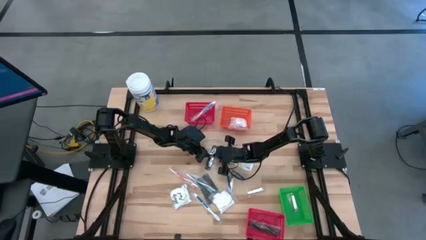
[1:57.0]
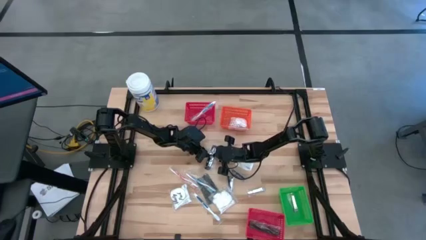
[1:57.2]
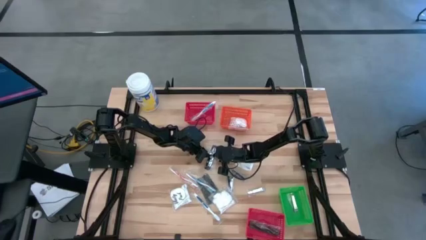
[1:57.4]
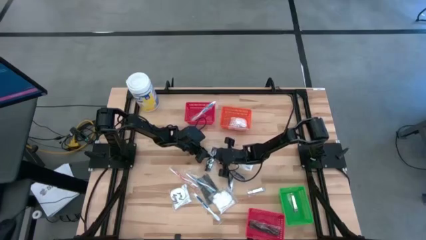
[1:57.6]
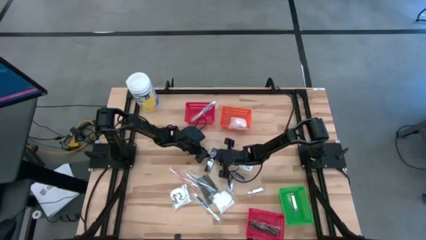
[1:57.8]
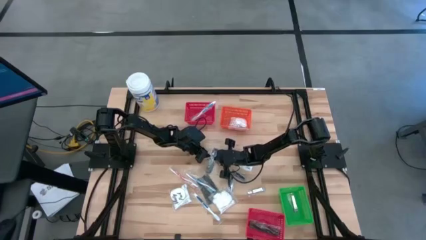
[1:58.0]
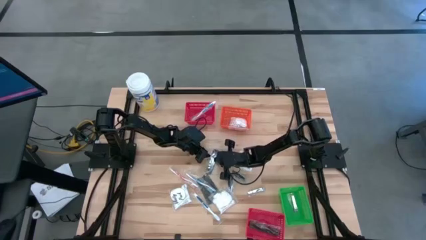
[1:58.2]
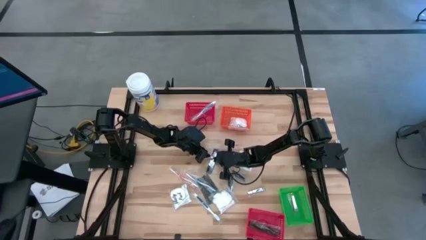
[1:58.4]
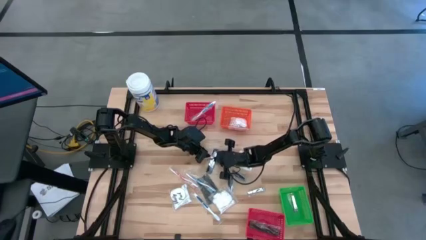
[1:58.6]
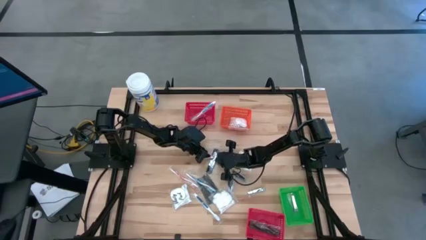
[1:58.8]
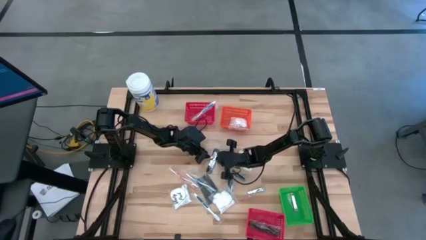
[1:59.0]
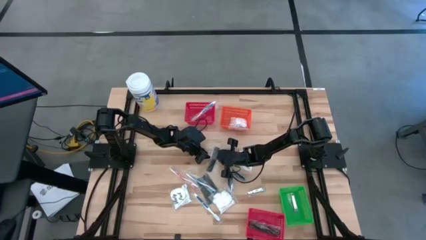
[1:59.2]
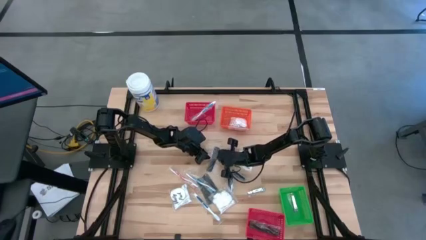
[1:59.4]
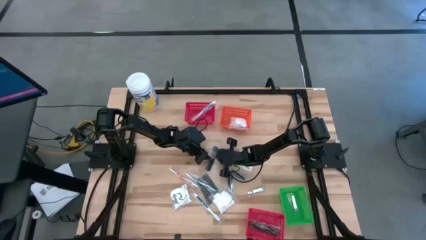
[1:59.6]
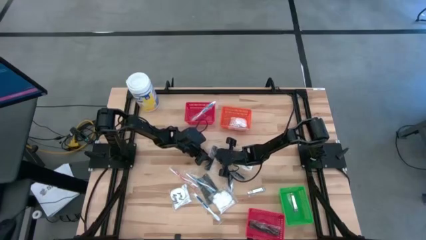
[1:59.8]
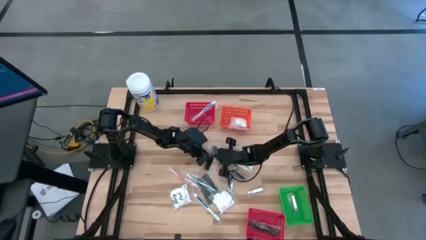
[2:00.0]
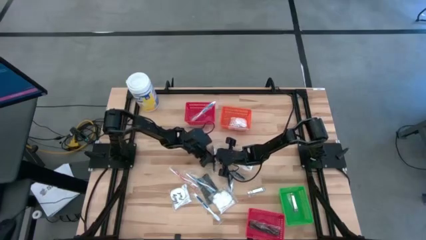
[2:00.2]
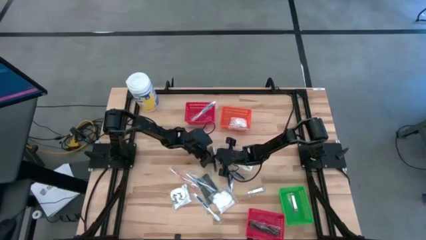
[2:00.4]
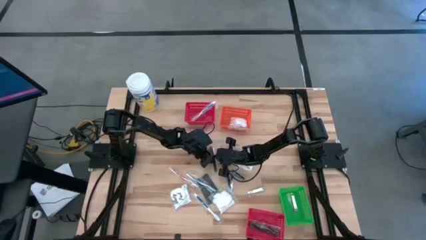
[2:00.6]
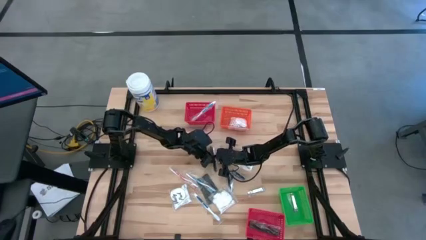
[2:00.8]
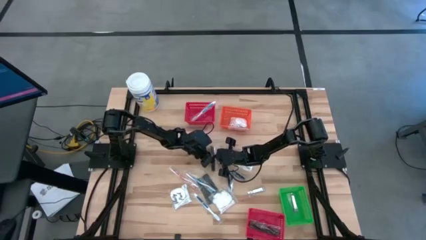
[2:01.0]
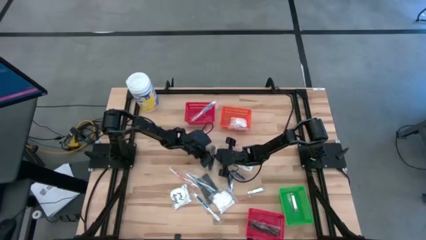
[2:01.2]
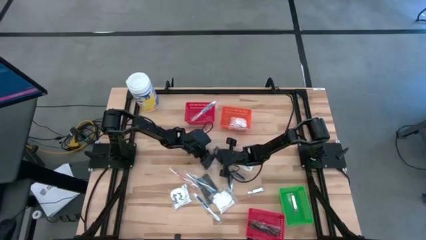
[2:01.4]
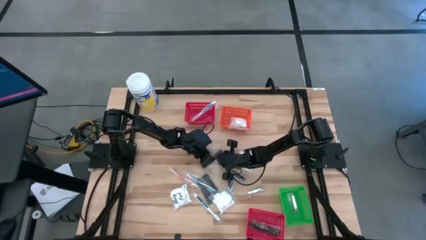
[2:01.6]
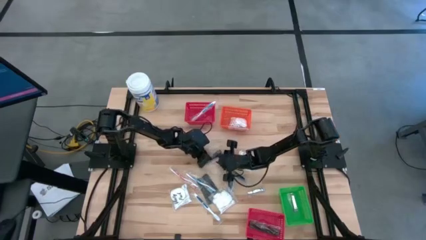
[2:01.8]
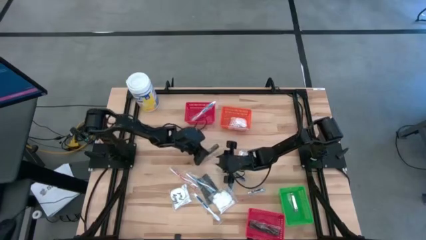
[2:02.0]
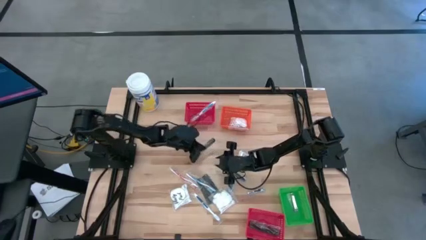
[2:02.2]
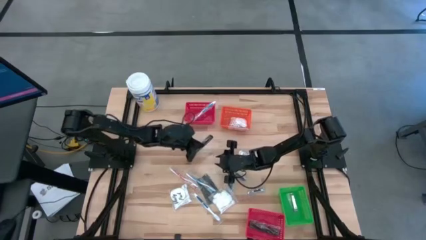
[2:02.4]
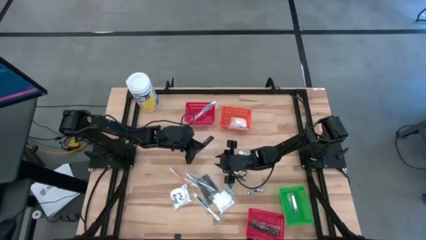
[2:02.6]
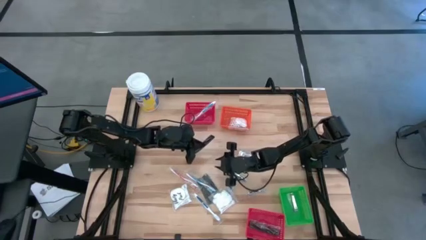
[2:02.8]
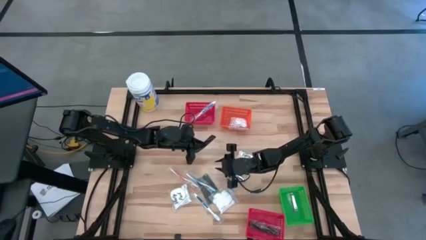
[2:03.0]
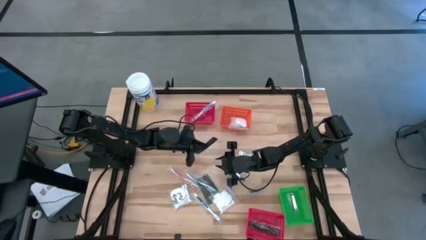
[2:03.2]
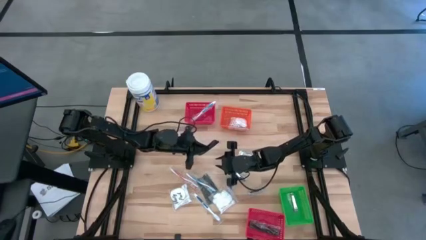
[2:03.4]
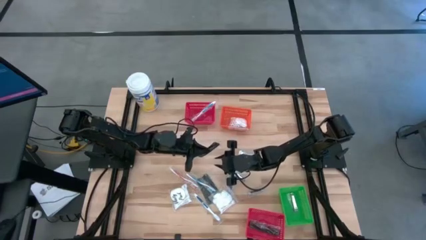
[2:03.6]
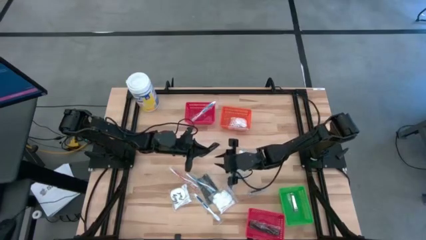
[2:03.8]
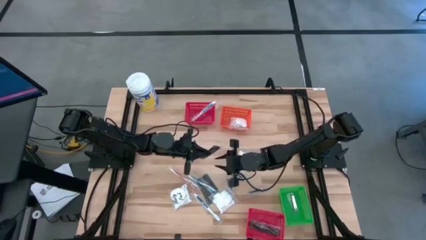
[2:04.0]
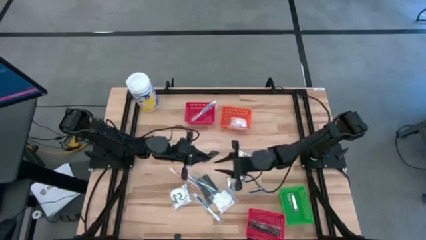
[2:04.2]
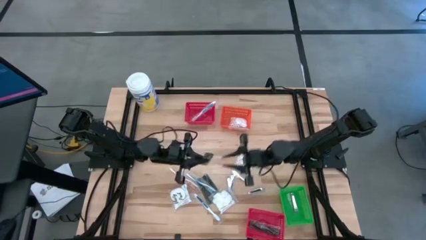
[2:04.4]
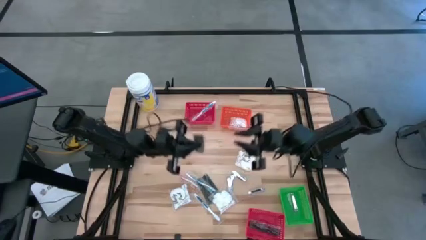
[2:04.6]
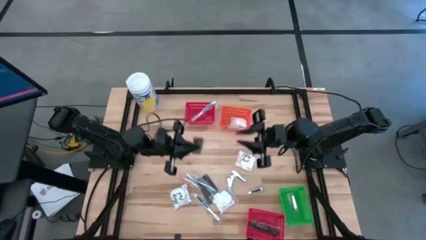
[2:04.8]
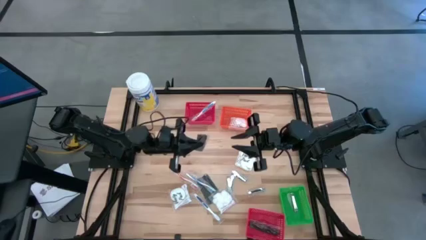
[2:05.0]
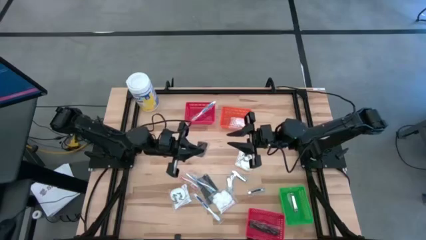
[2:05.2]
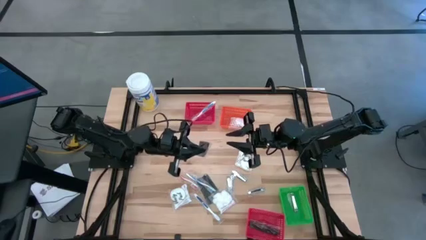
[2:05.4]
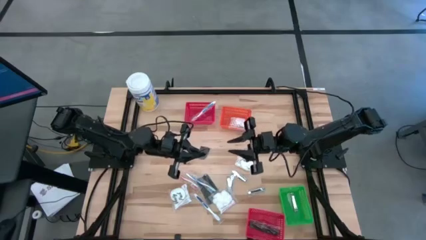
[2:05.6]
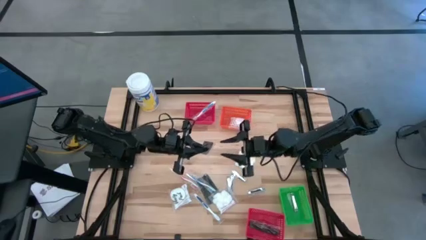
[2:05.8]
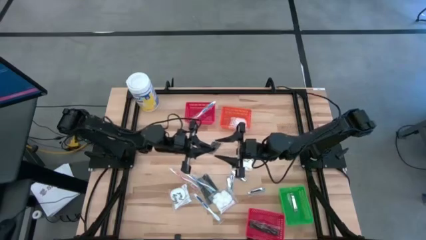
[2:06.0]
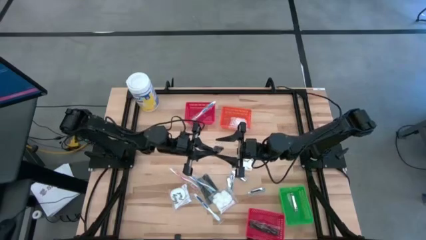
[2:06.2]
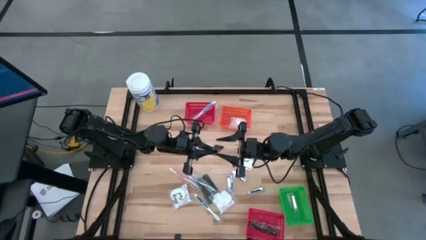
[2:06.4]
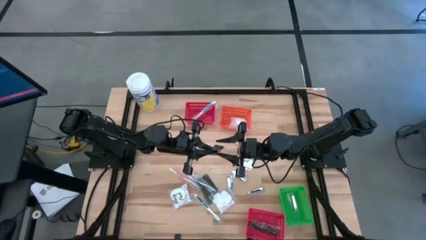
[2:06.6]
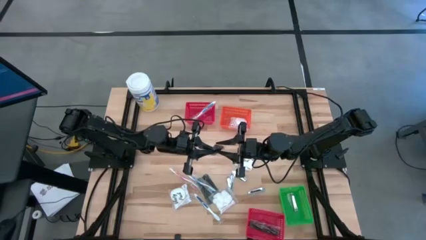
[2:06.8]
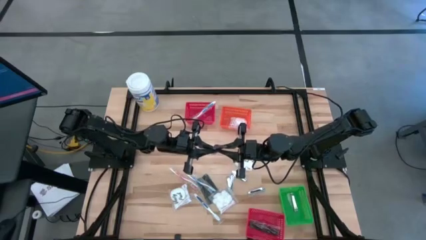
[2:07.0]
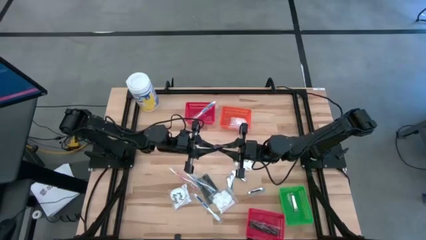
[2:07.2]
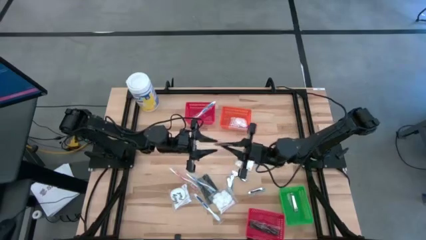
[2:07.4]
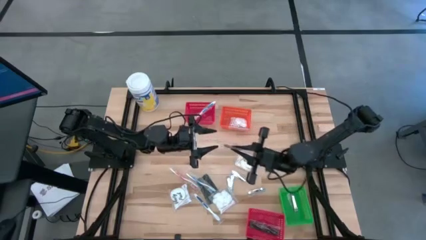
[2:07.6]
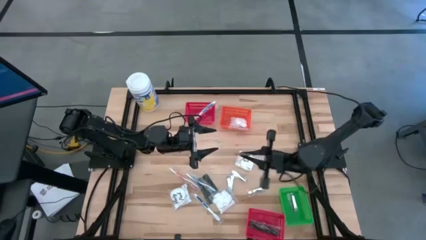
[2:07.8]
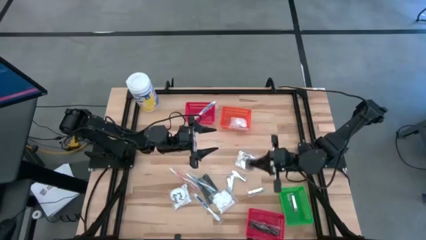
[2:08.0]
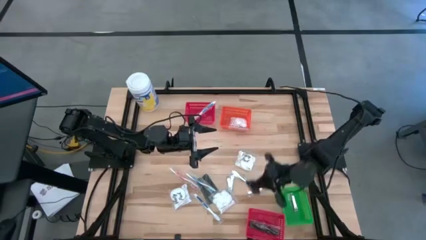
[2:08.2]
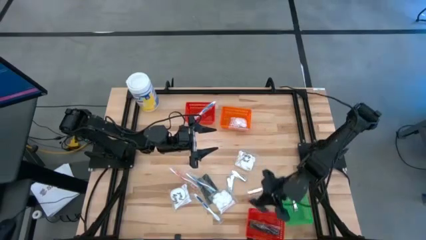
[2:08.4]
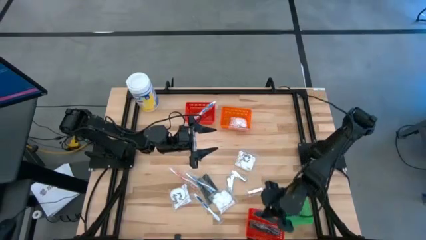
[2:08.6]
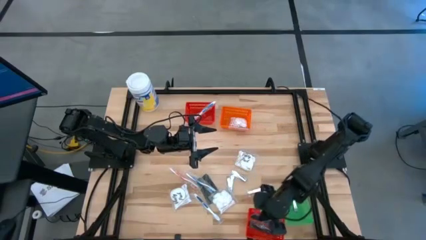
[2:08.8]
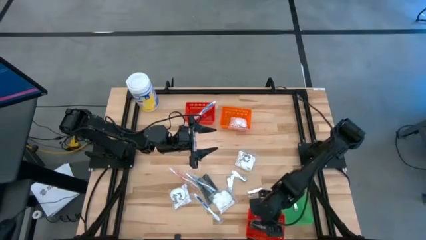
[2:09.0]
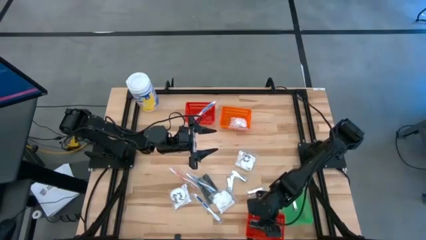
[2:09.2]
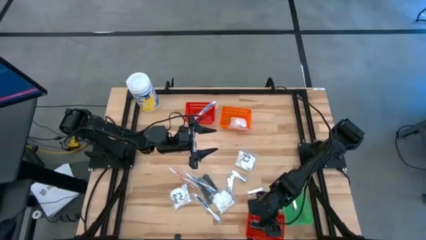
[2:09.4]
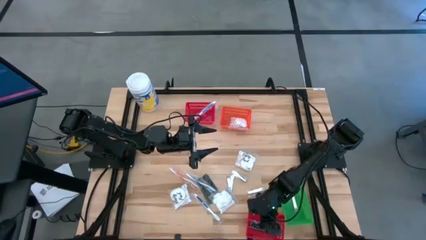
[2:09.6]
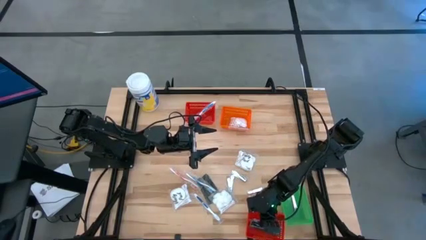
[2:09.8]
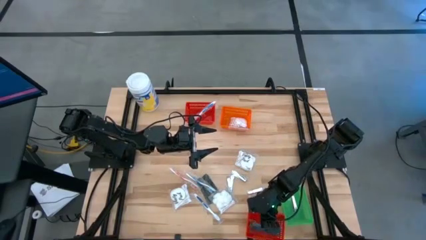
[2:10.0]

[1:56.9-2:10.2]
Task: Pick & Place Travel size toiletries
Put the black hair comb into the bottom red bin
